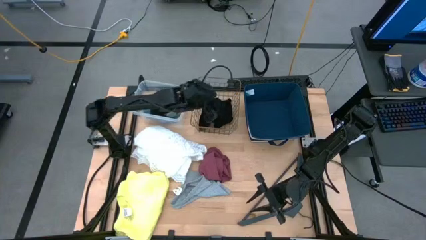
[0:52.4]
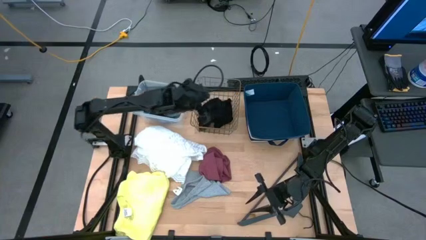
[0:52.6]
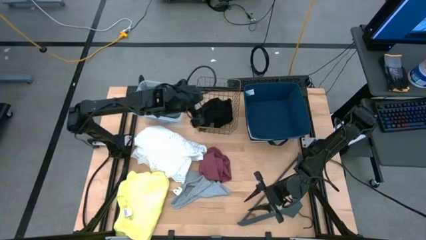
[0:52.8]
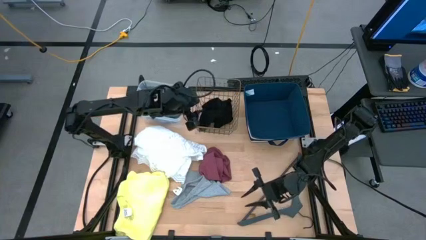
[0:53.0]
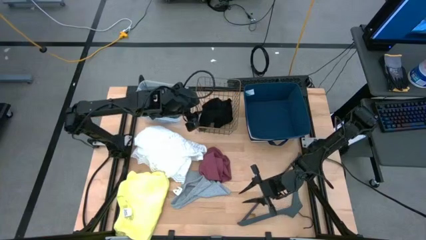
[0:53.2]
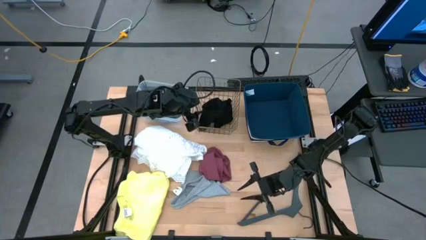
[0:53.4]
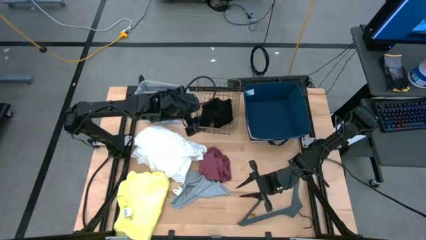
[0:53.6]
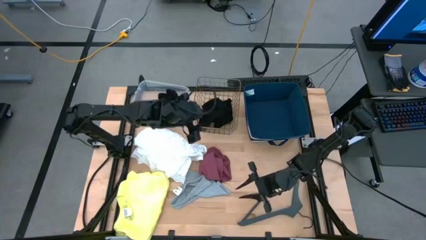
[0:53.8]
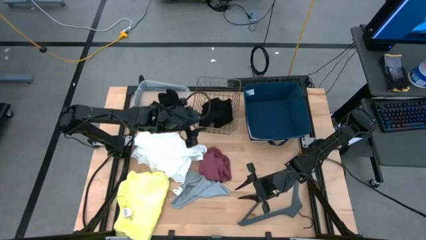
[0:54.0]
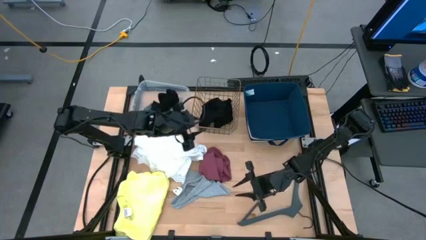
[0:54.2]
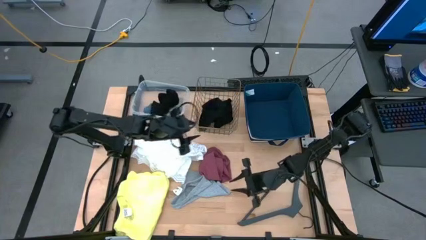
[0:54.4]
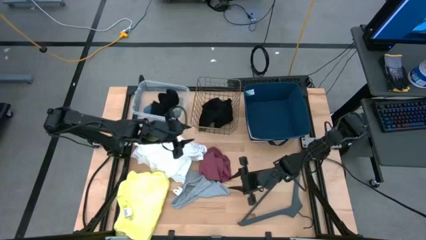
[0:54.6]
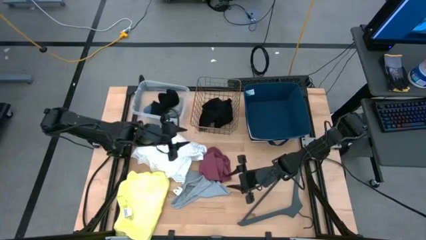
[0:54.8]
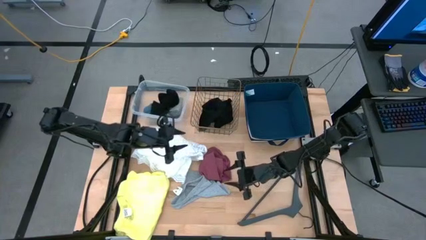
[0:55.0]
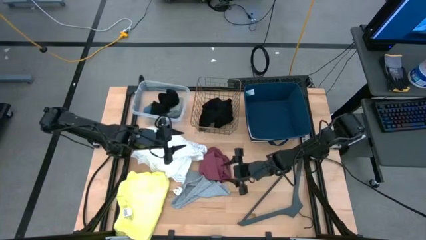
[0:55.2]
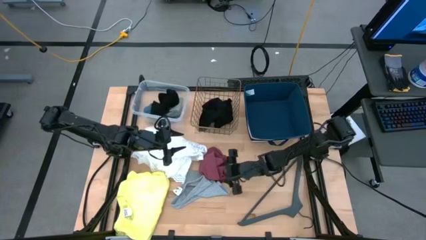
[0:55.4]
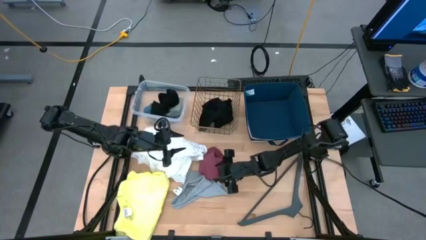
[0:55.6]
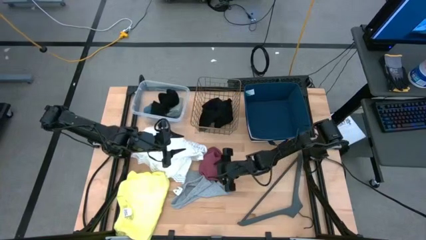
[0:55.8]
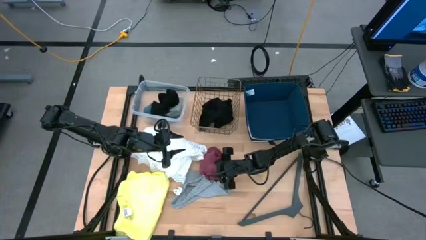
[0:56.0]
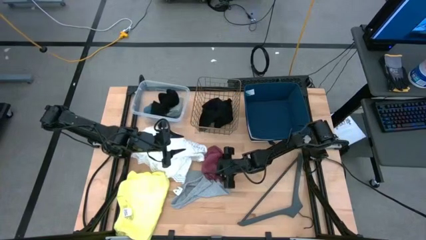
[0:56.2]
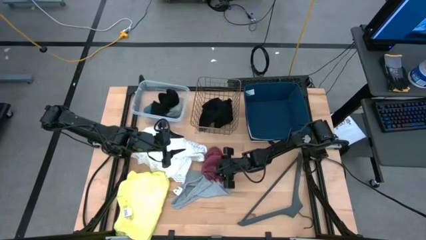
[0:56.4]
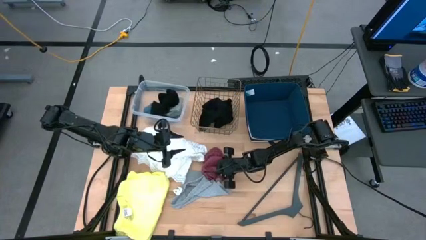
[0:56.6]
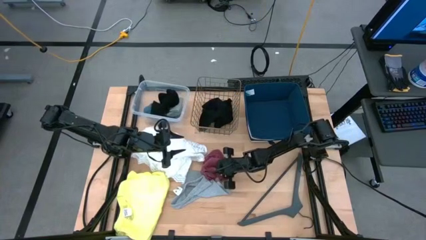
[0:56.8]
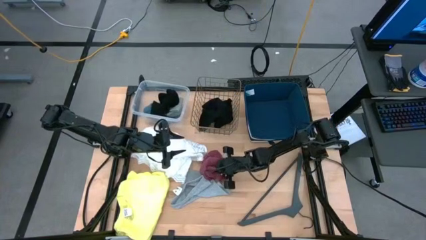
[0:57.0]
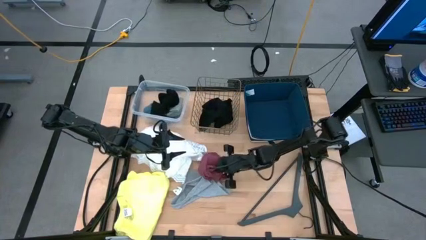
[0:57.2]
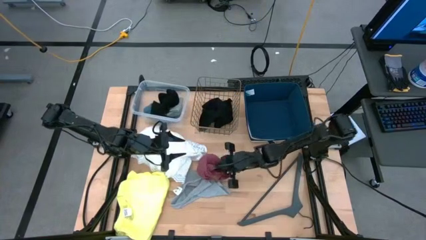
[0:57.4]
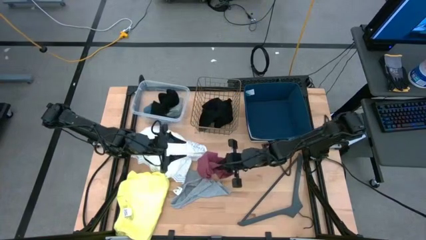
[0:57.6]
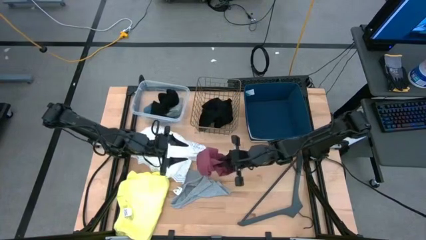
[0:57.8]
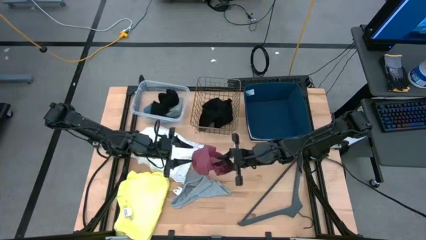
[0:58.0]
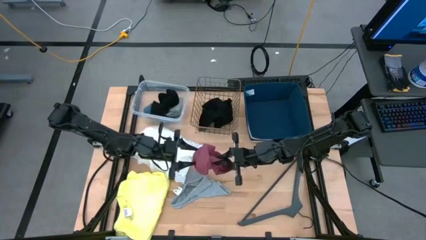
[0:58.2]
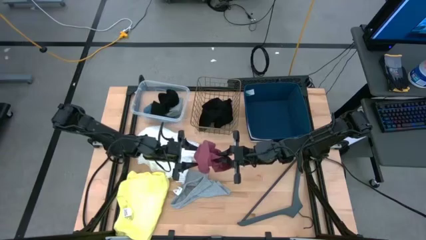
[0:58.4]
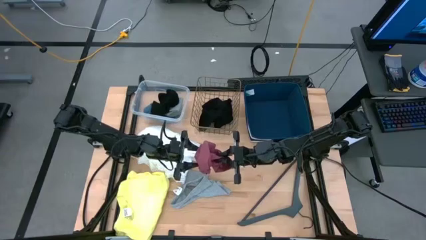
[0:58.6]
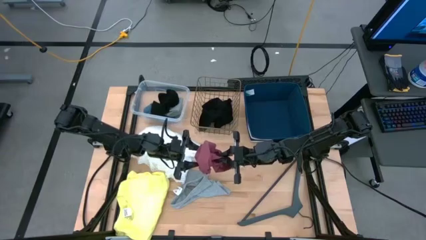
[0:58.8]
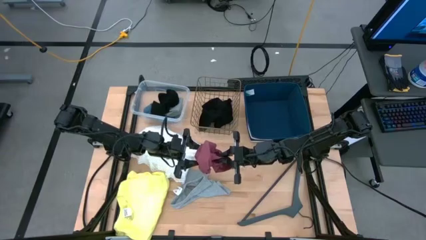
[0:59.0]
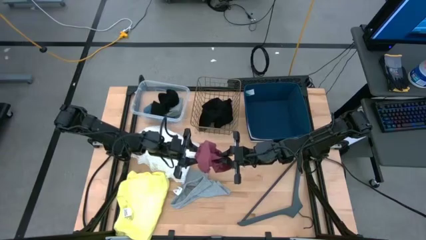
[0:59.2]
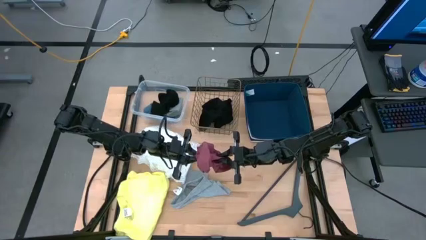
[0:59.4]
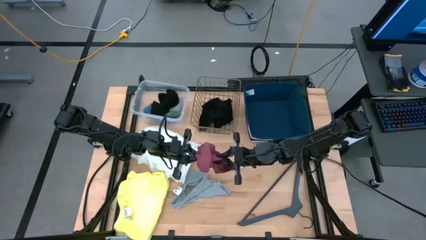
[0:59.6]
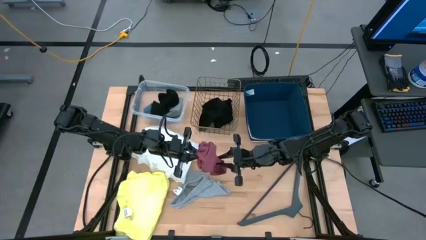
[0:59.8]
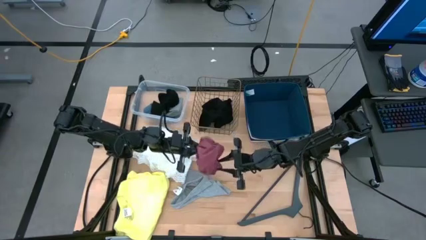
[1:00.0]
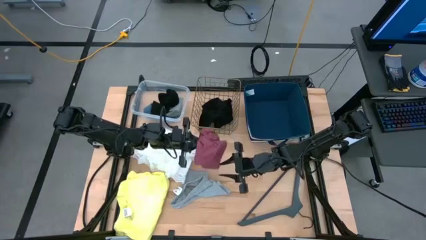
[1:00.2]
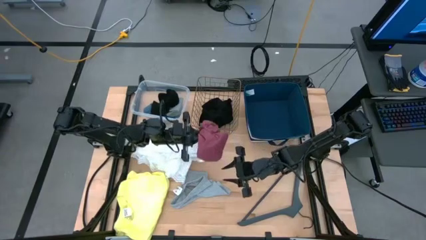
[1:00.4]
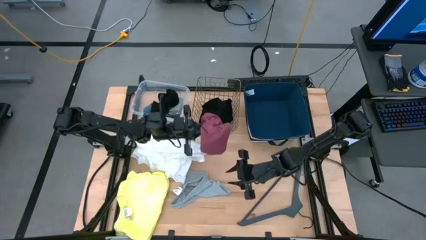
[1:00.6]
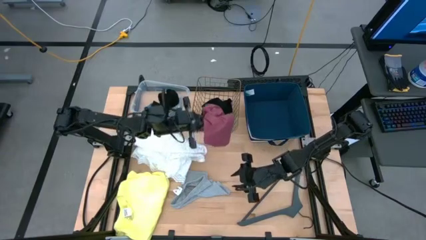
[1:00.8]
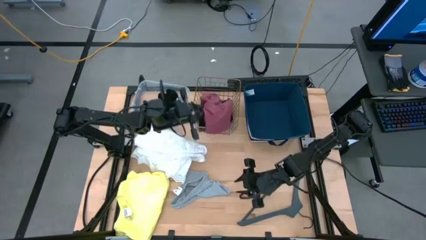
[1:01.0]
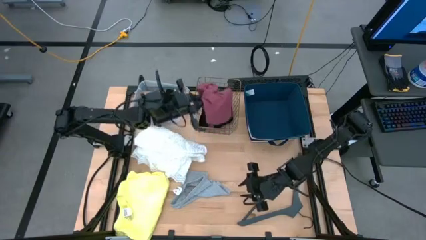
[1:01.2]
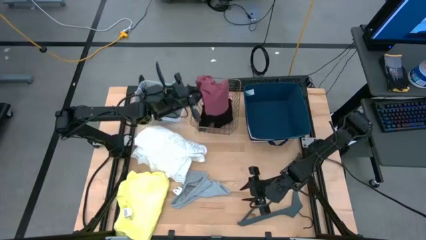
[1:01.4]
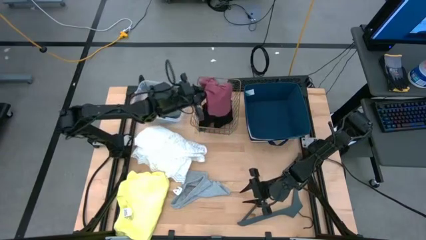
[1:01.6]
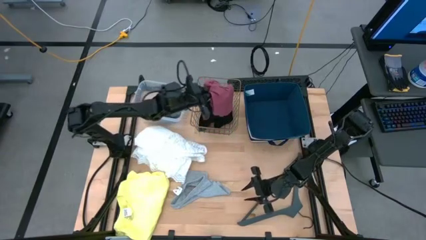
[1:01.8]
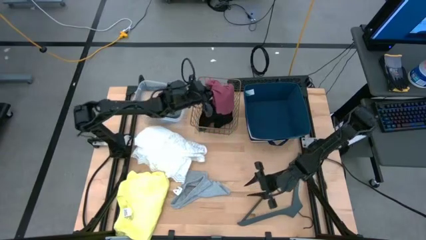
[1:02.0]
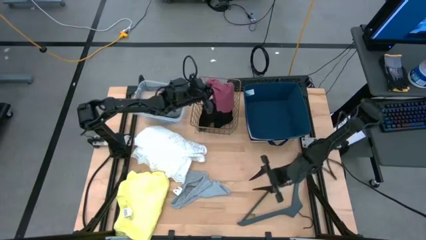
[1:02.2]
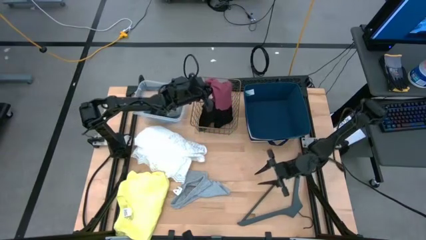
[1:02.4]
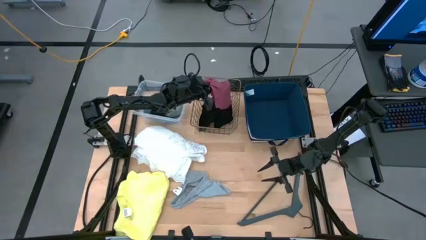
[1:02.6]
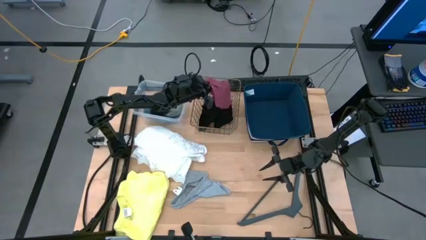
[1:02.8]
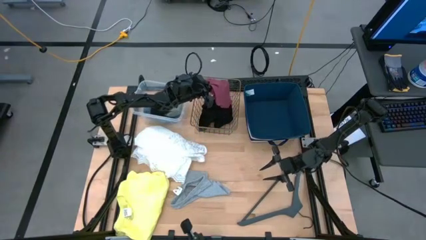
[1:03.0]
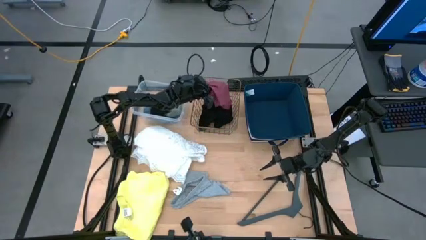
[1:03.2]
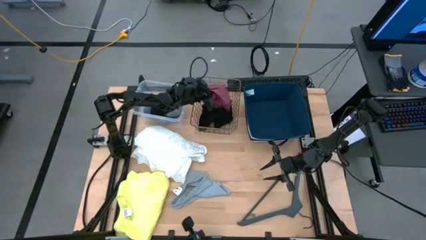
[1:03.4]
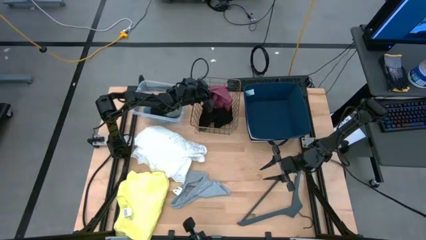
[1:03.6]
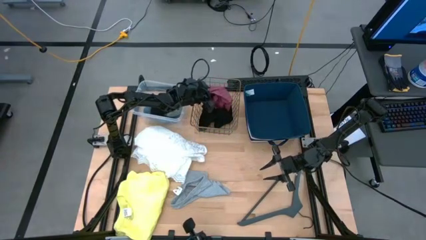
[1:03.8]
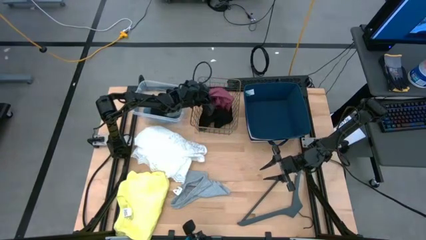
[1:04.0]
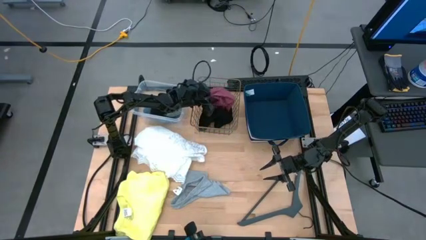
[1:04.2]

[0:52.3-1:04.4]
Task: Pick & Place Cloths
Put the pink underwear into the wire basket
